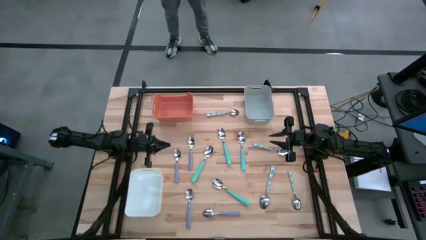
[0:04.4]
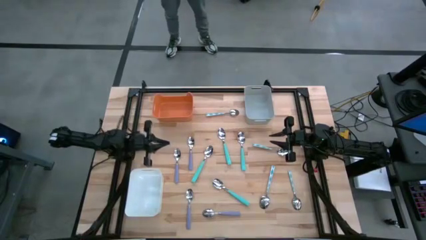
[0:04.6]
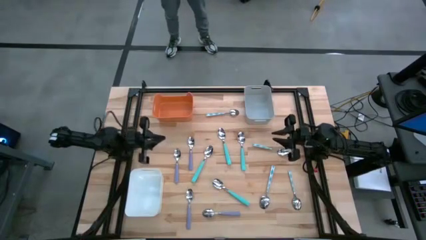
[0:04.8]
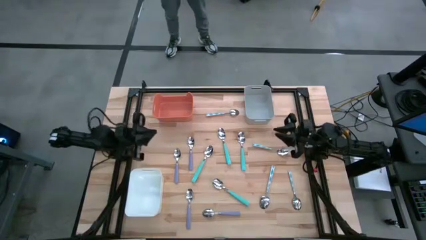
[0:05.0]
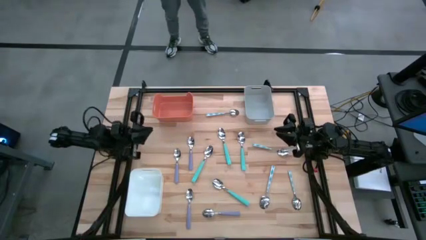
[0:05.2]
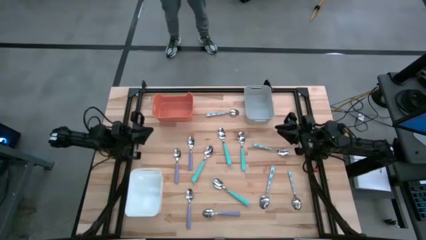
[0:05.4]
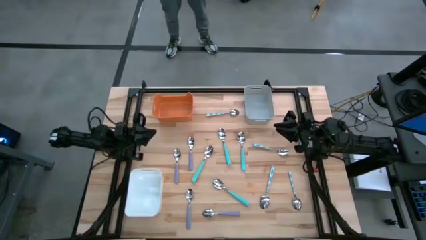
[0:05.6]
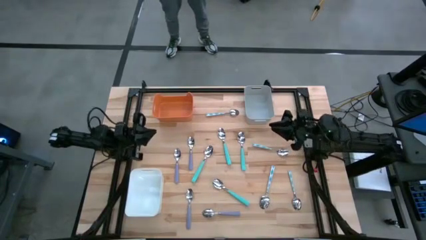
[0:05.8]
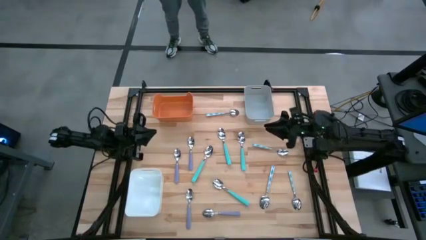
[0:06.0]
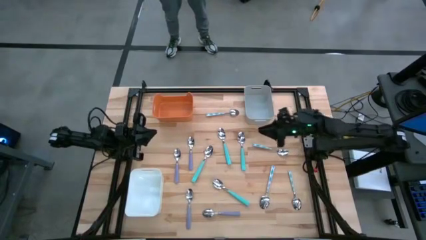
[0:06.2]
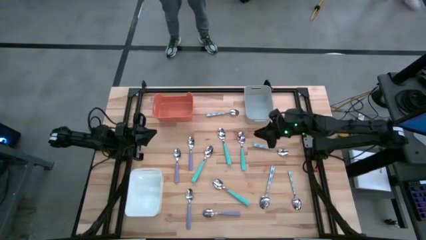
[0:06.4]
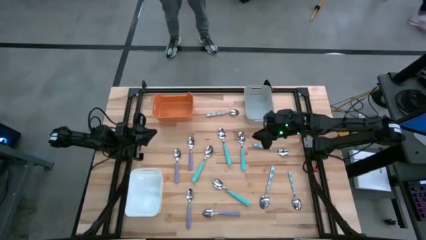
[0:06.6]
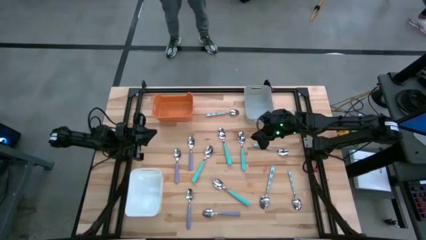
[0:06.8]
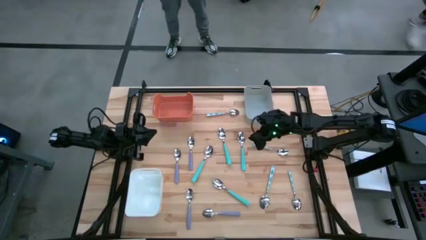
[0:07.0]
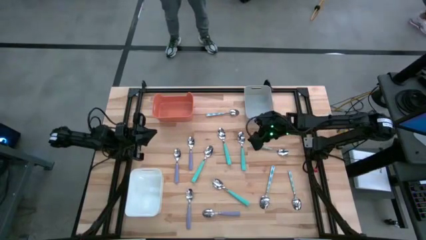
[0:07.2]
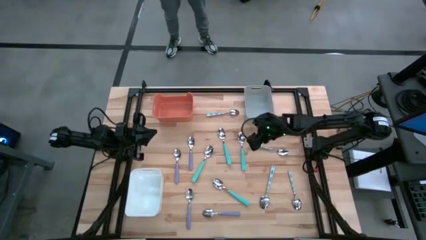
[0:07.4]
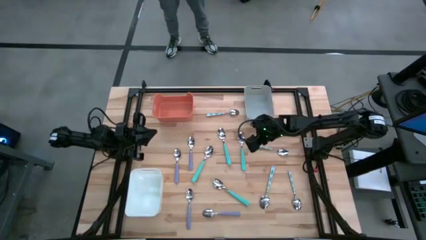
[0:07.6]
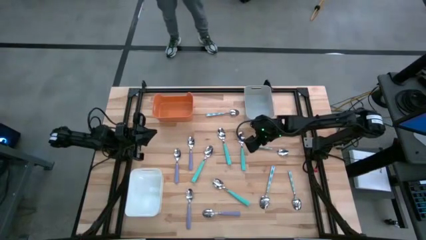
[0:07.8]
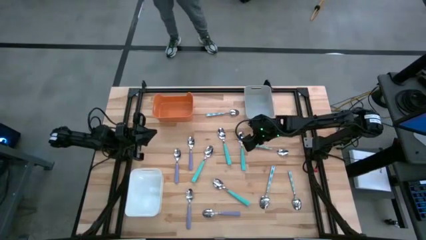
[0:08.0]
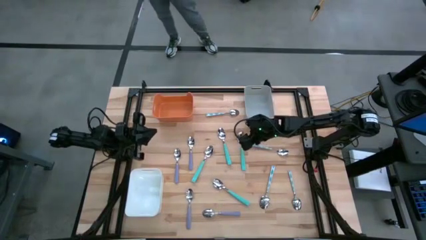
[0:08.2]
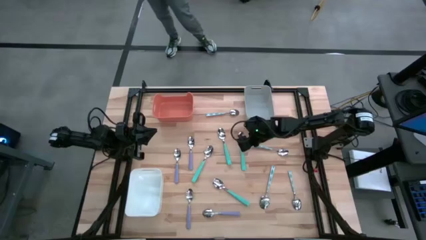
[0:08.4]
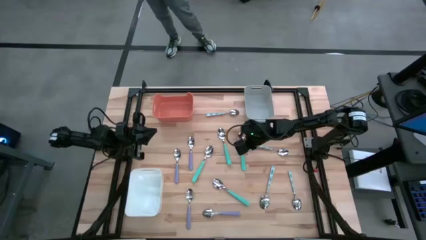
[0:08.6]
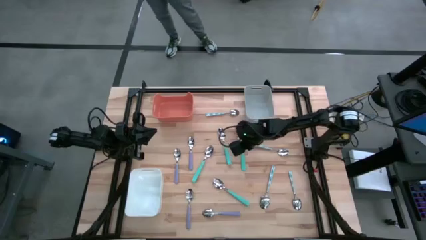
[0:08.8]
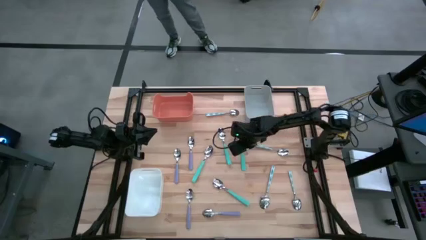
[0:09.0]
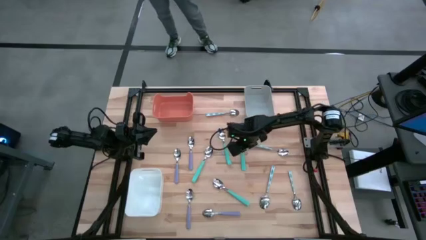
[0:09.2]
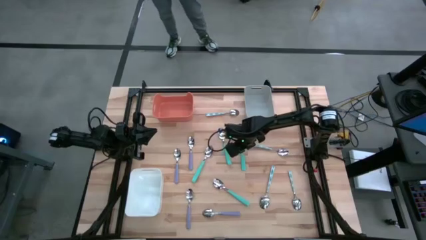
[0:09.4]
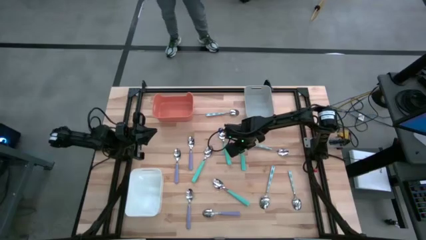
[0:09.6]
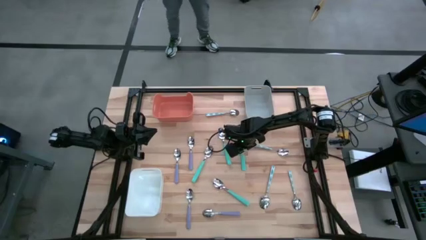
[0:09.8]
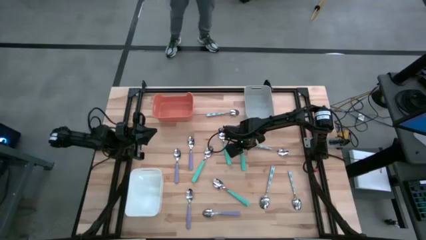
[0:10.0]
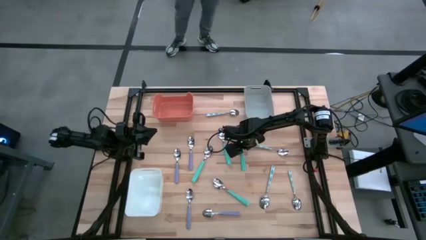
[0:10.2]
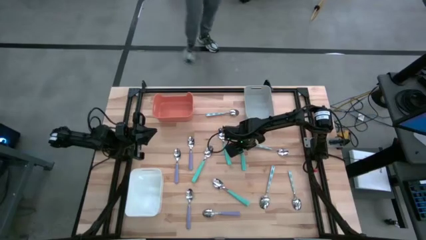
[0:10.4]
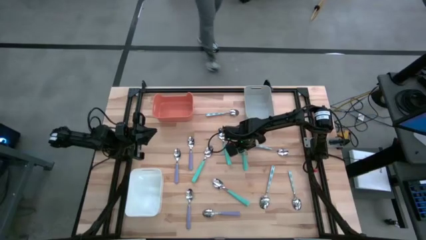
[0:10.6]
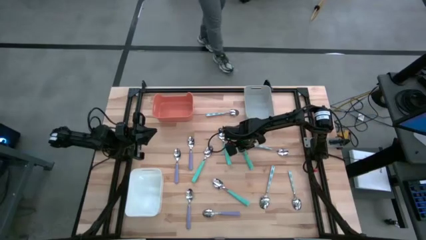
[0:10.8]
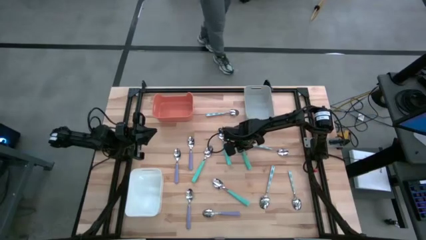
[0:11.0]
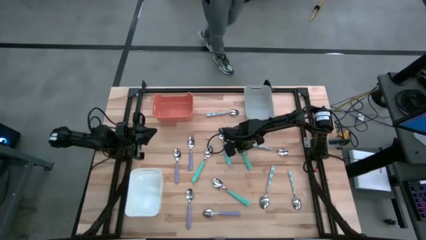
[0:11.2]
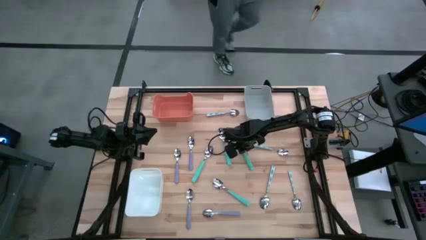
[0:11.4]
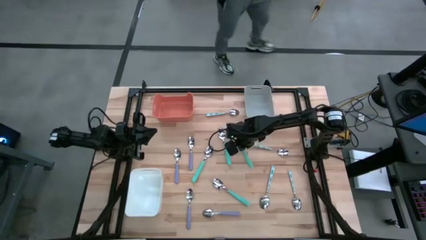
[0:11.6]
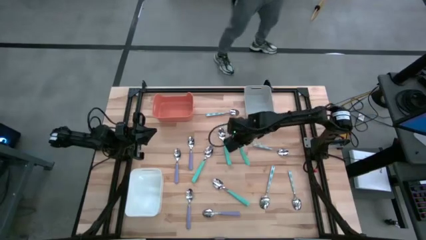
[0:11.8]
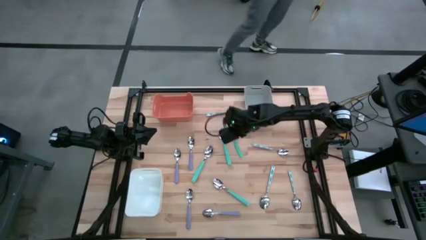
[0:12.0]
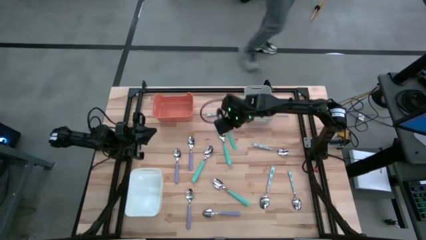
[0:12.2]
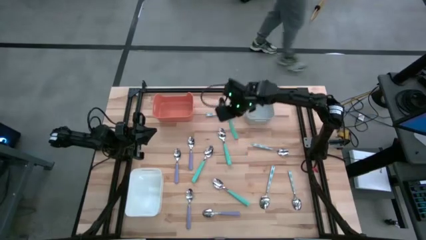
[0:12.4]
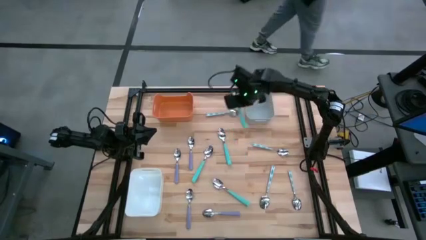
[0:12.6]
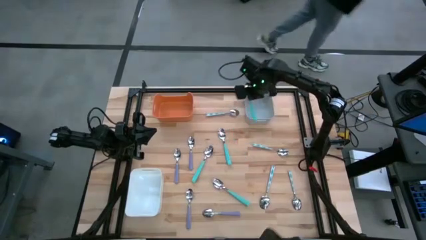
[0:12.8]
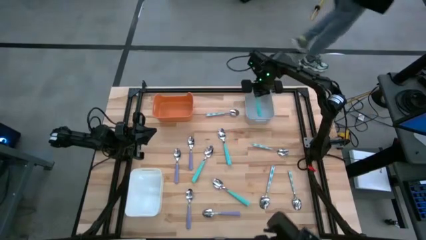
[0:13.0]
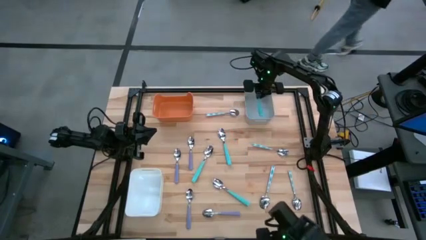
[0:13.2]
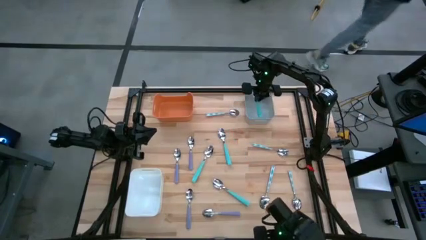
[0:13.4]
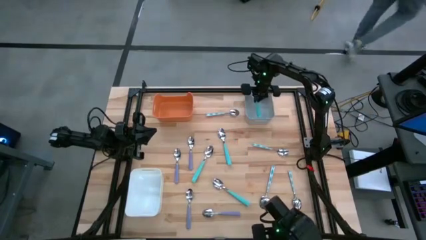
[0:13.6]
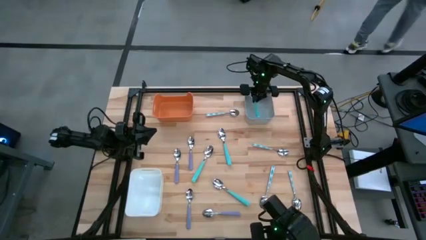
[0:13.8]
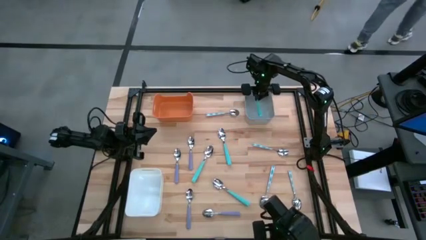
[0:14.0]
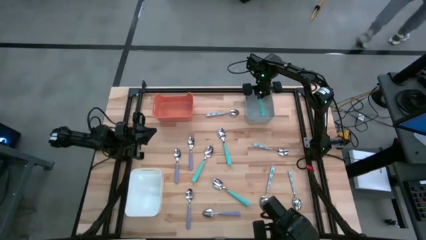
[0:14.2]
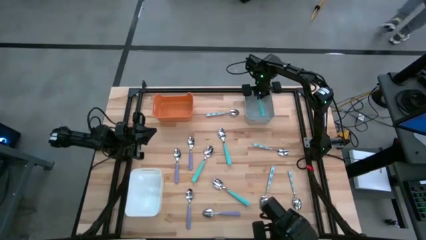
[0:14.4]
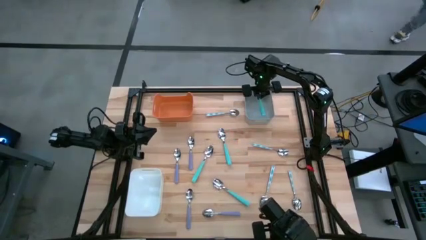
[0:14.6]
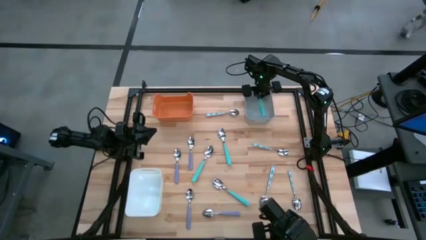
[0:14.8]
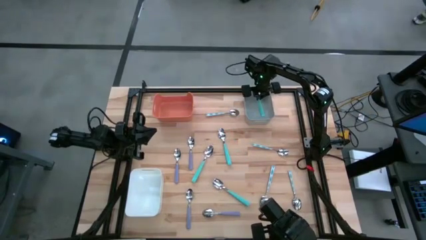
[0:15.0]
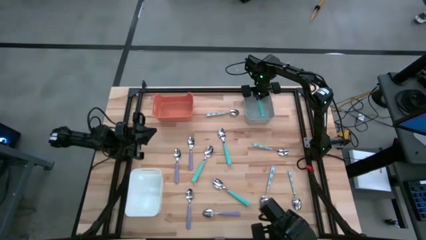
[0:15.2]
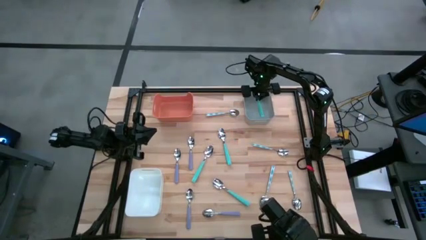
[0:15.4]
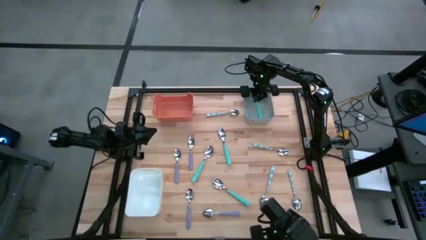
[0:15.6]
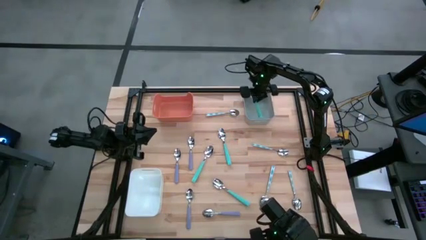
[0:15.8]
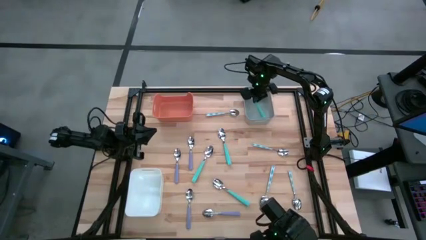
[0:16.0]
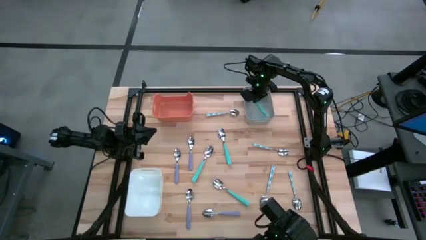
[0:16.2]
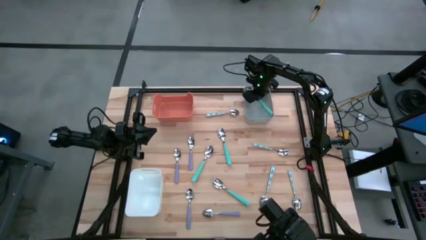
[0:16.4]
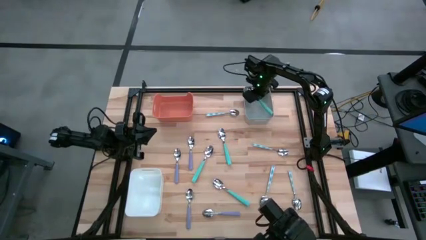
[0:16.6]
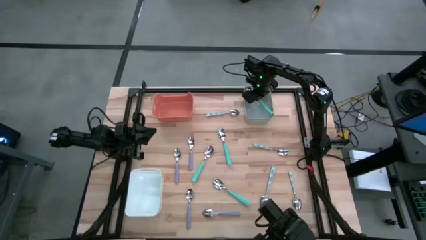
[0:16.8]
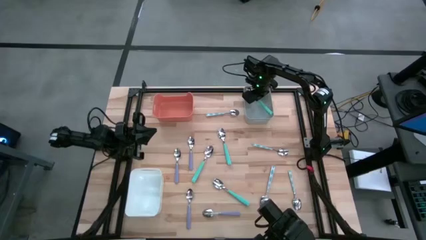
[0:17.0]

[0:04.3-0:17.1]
Task: Sort silverware by color (type)
Put the light blue spoon into the gray bin

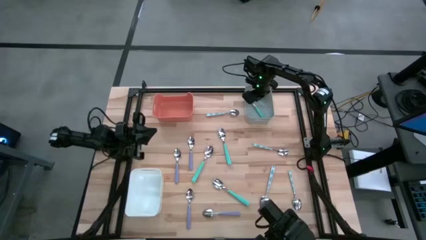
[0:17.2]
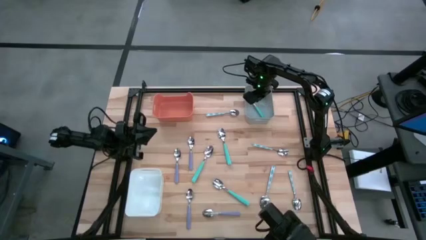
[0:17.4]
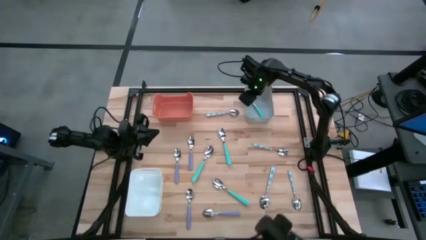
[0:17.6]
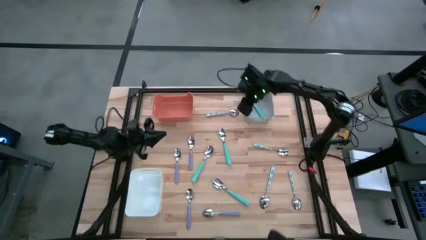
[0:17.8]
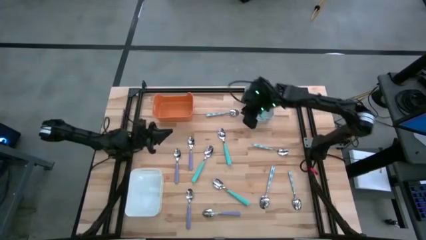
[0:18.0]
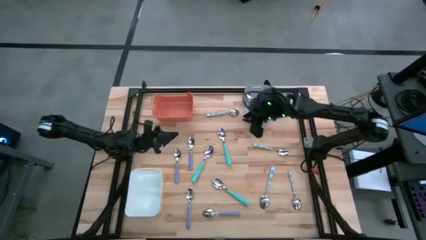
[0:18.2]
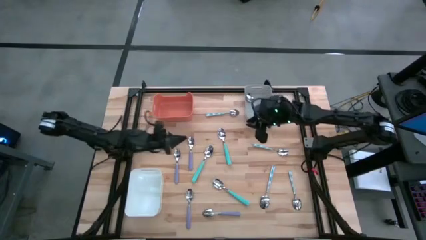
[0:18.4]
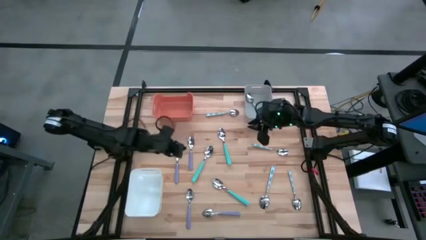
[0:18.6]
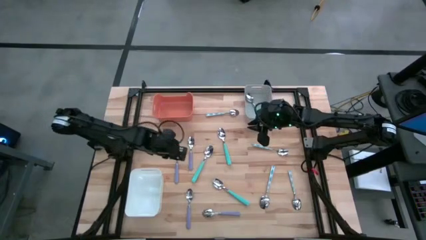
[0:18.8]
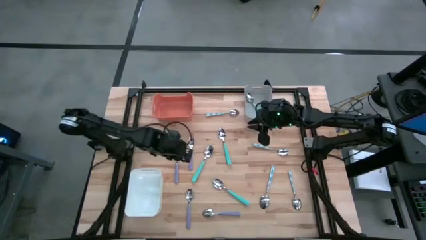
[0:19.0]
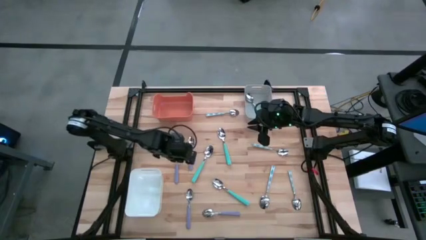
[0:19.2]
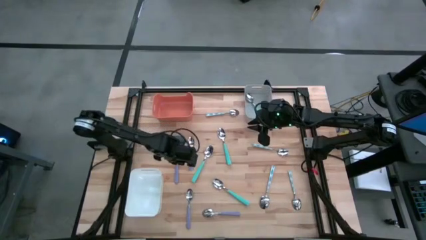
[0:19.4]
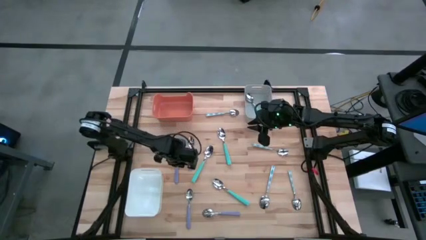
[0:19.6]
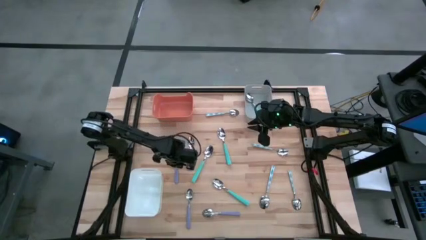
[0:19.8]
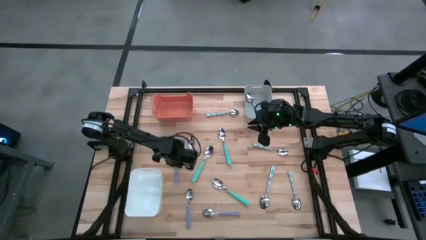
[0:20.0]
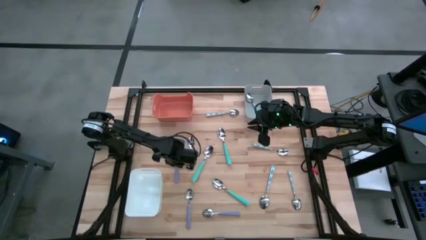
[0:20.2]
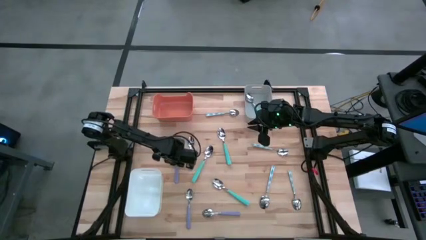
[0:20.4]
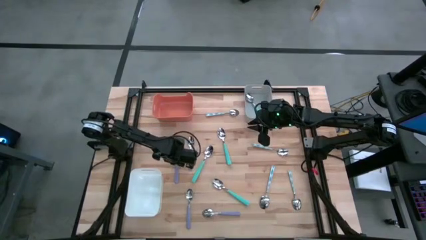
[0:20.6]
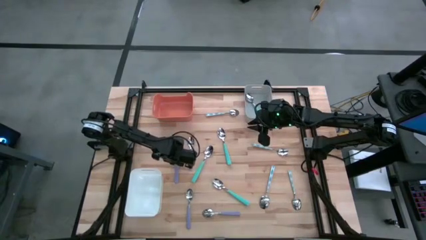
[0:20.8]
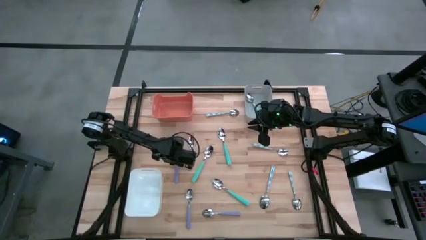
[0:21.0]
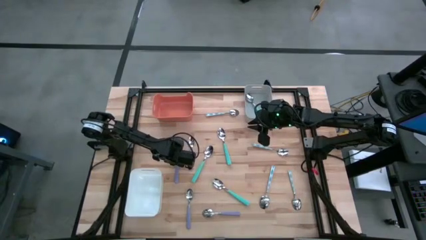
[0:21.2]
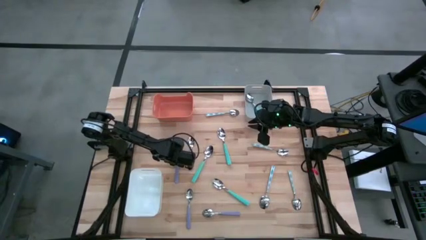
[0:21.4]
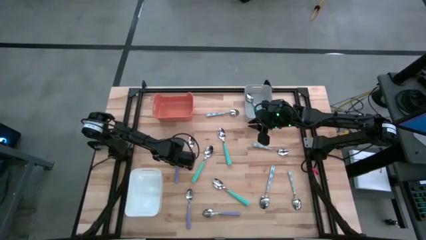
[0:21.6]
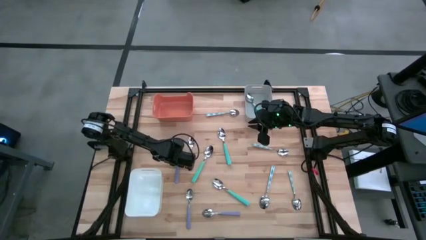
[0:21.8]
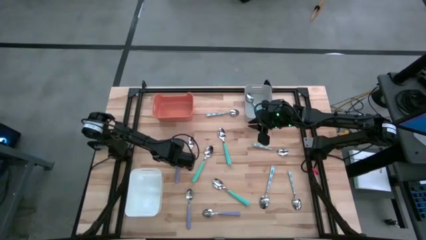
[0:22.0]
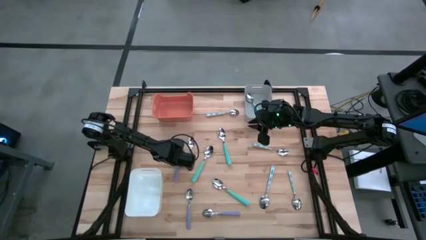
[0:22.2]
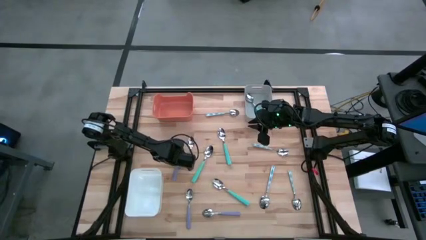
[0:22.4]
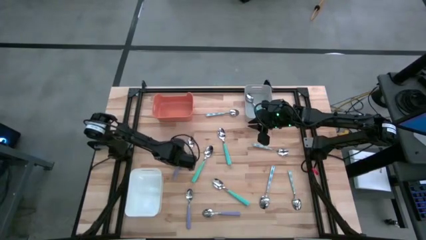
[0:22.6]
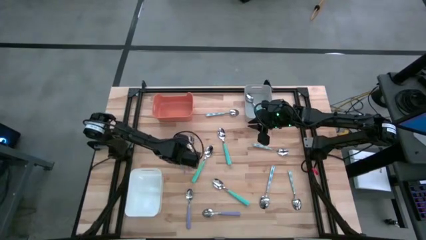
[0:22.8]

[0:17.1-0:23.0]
Put the purple spoon into the white bin
